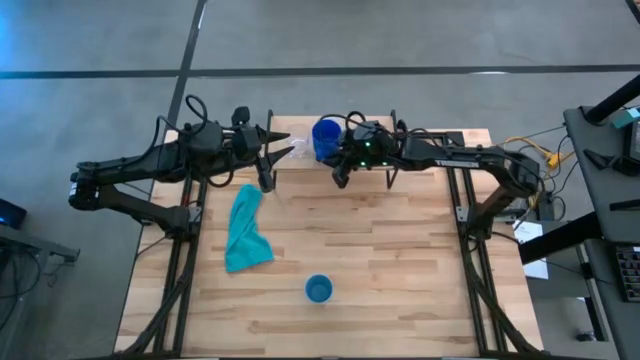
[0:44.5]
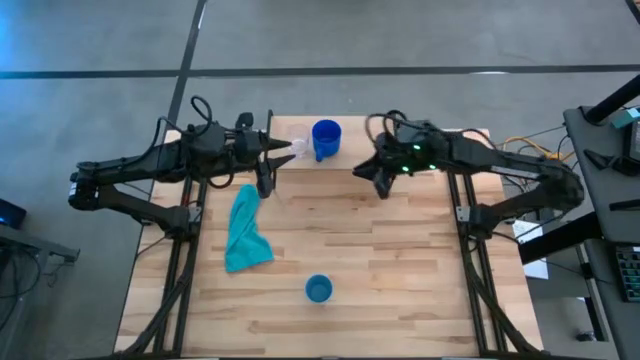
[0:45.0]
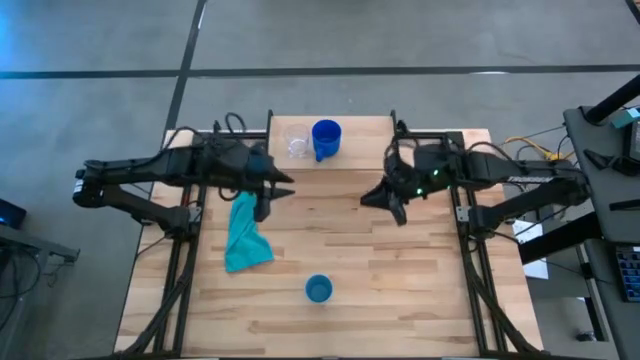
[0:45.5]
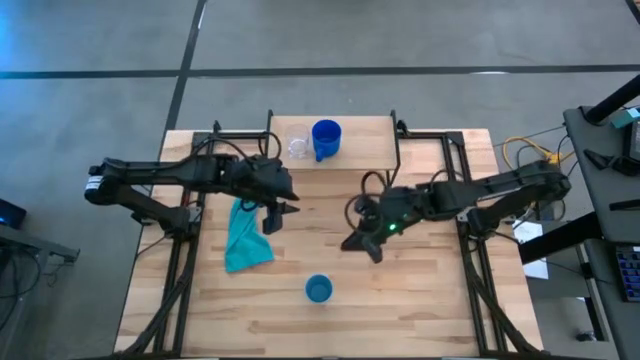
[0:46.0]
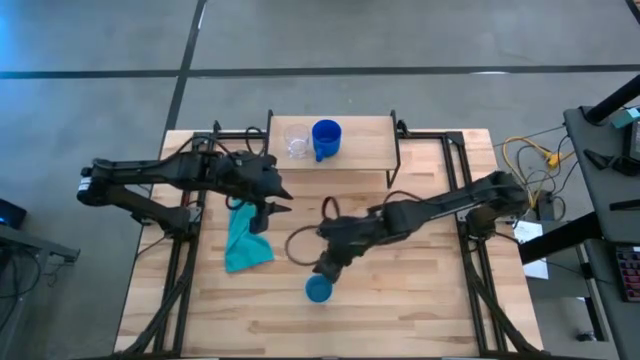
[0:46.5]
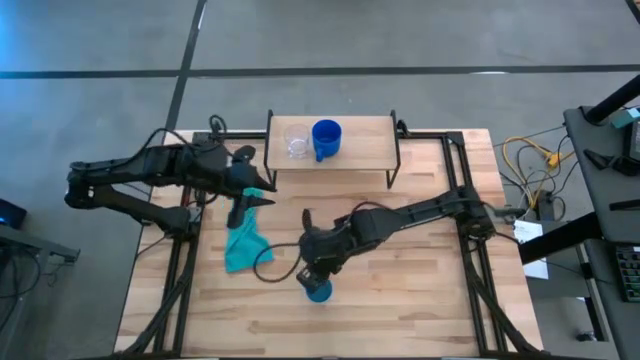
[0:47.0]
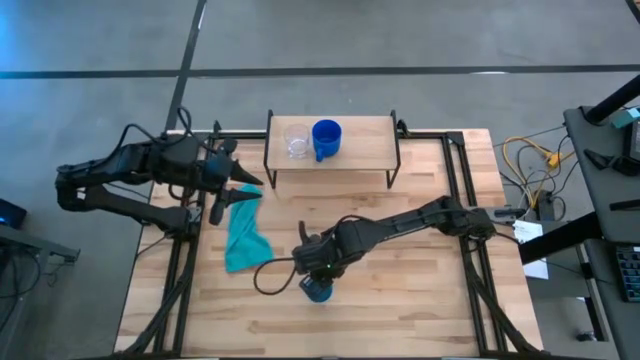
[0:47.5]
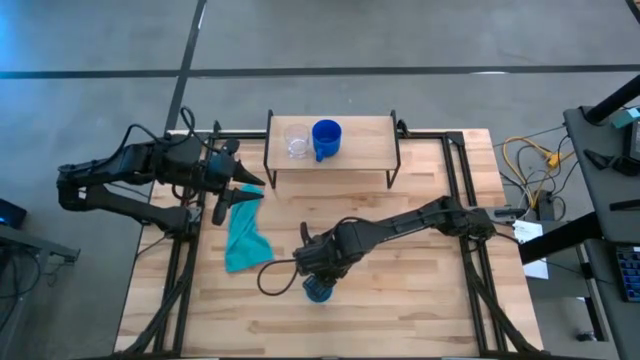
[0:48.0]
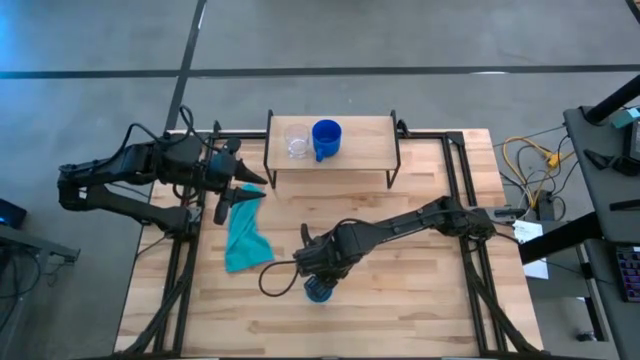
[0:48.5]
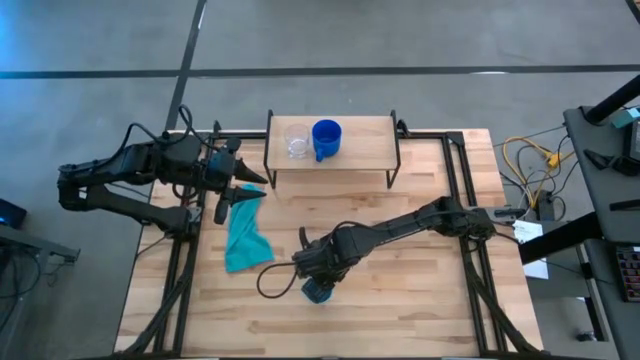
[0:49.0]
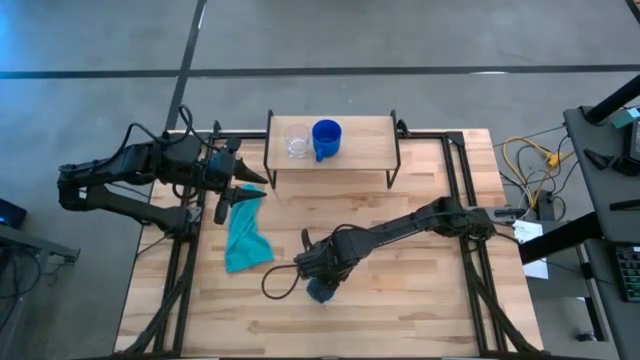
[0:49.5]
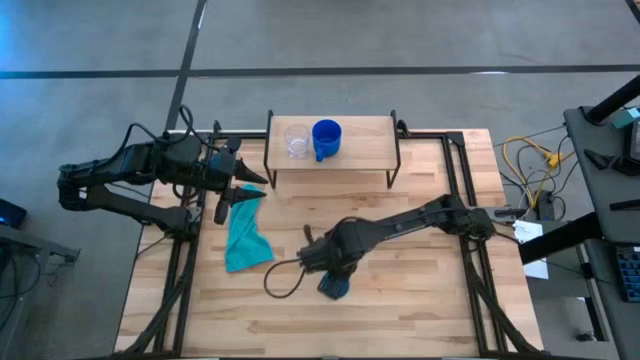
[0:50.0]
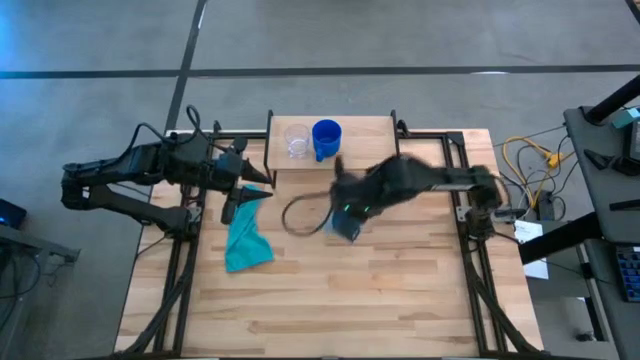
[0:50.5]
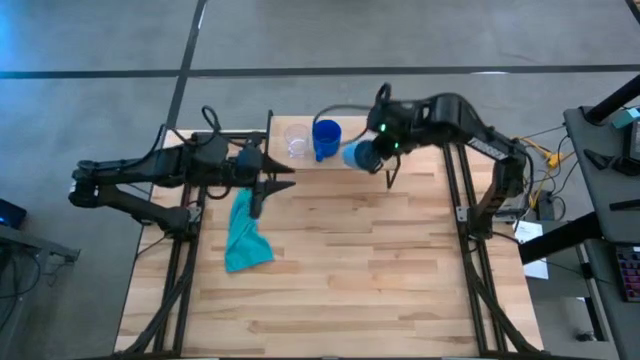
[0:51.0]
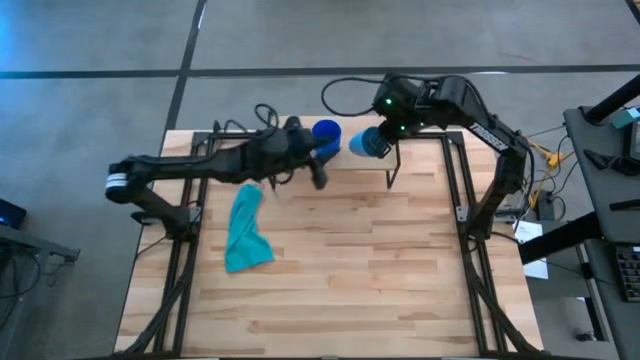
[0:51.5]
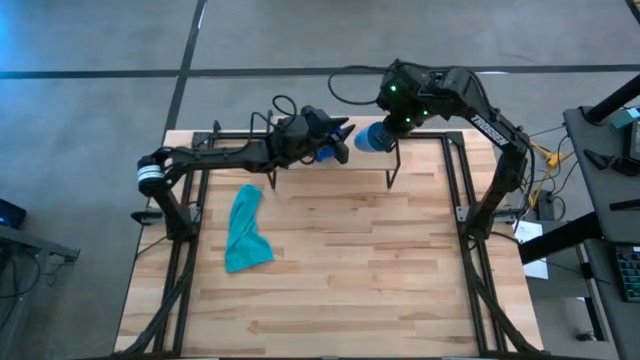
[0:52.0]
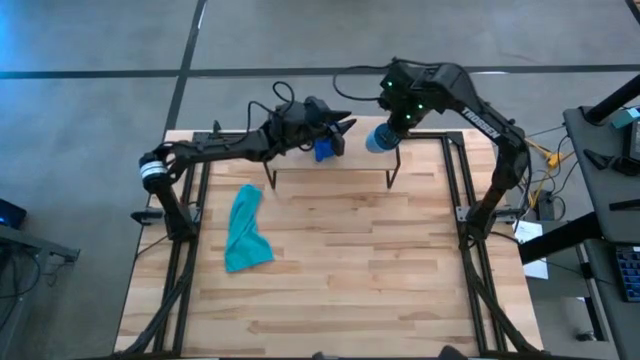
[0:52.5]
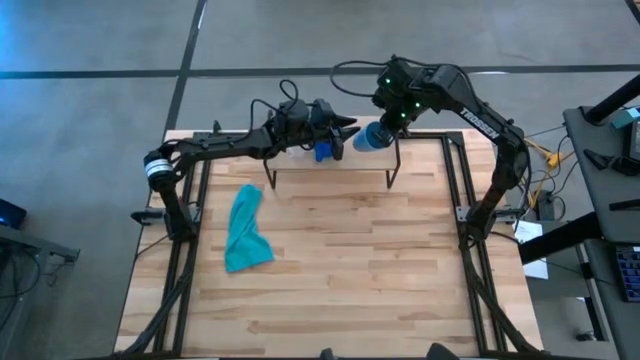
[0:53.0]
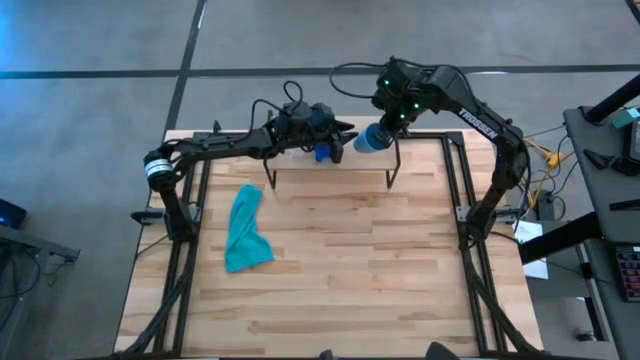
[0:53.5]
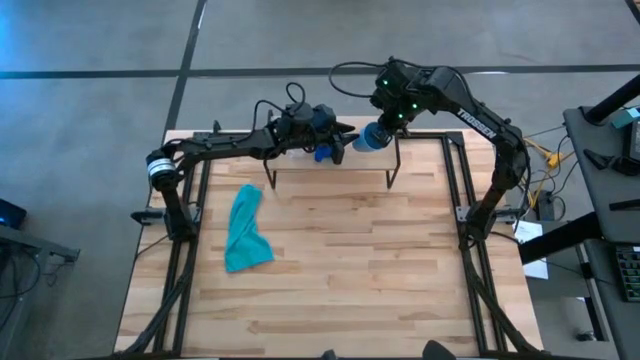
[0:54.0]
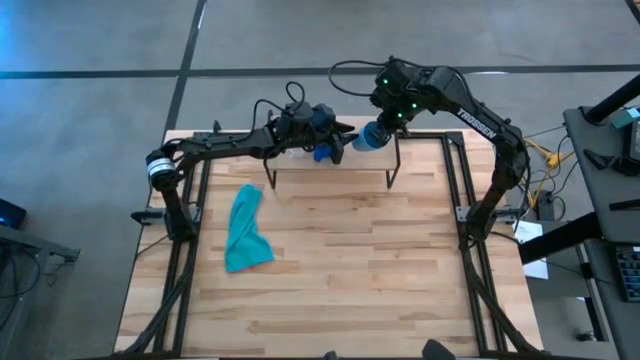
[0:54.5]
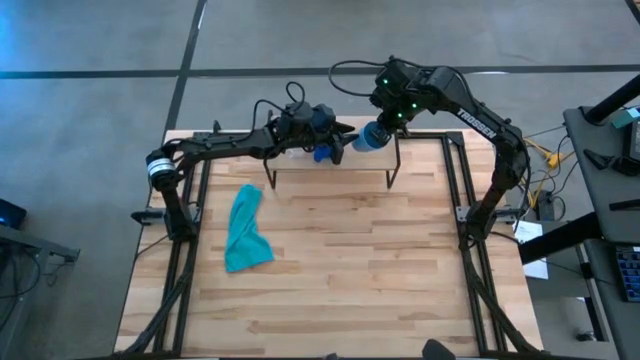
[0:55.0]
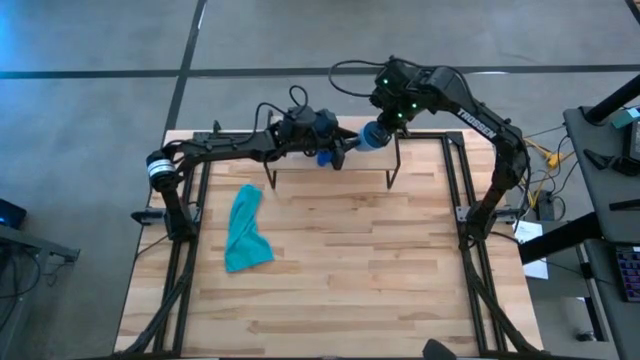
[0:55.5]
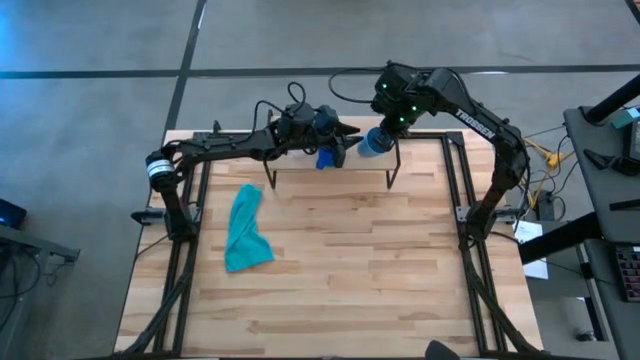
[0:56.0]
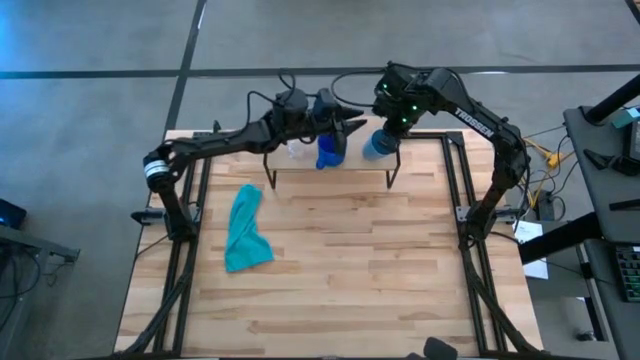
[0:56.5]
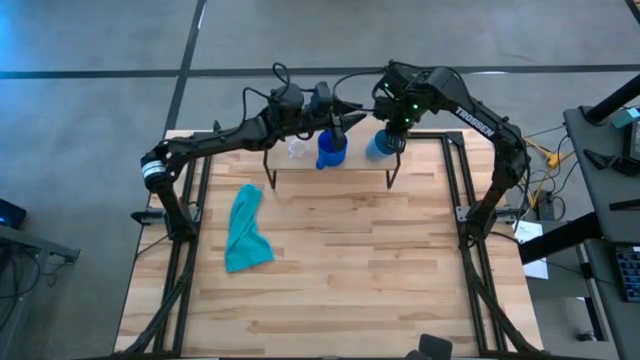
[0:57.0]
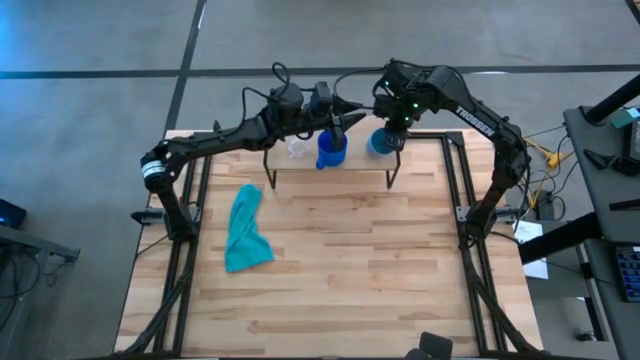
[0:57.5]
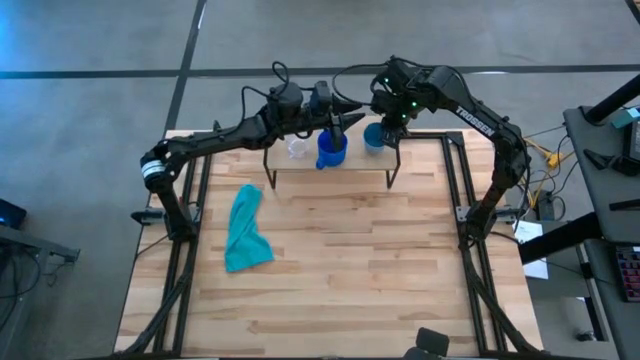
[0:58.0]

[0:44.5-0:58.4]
Task: Stack small to large cups/mugs on shelf
Put the light blue cup on the shelf

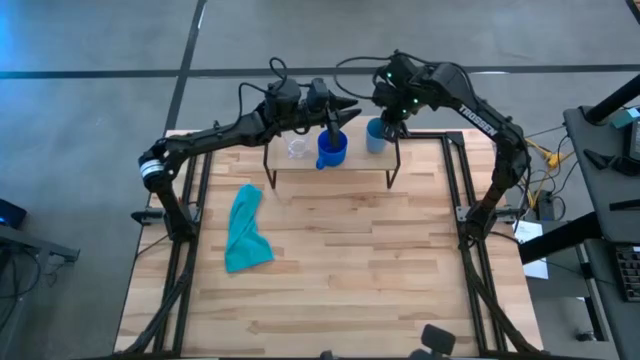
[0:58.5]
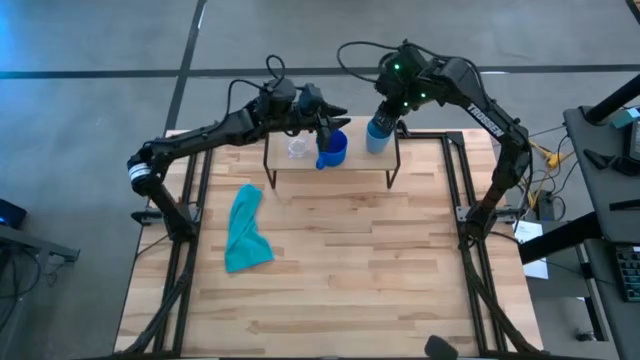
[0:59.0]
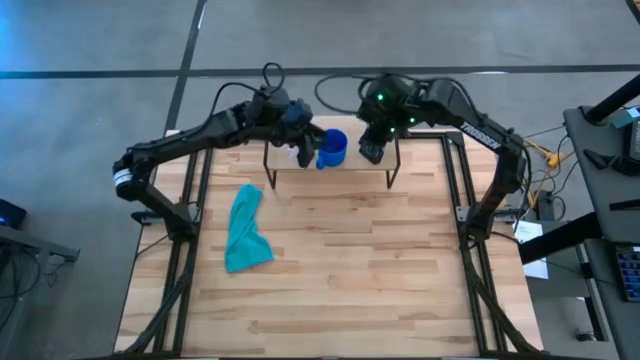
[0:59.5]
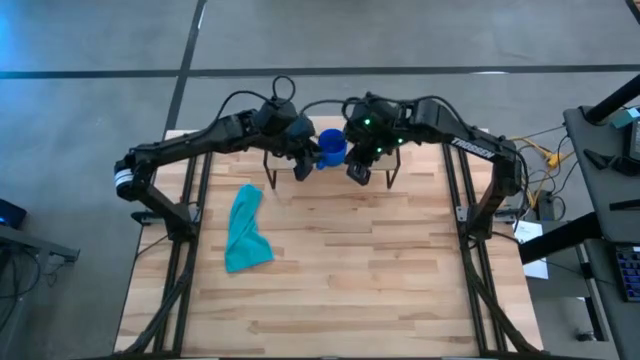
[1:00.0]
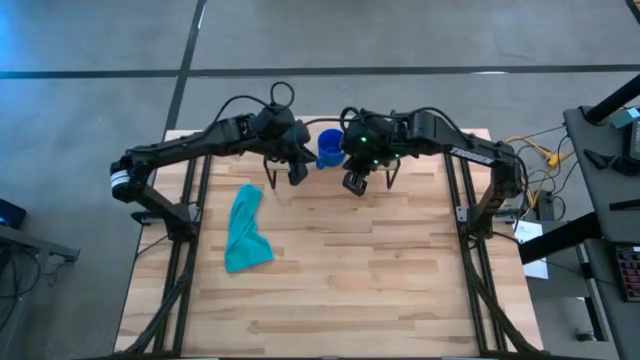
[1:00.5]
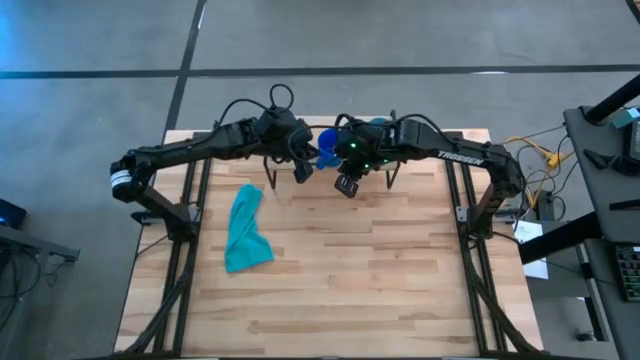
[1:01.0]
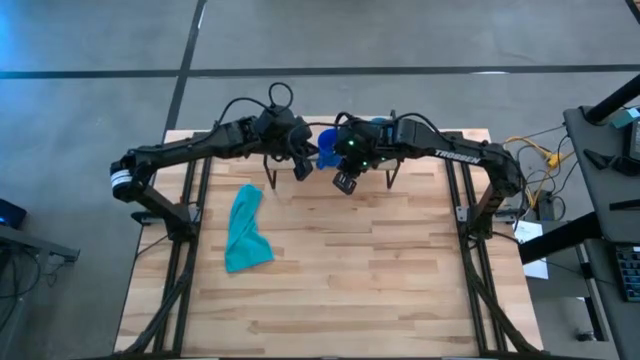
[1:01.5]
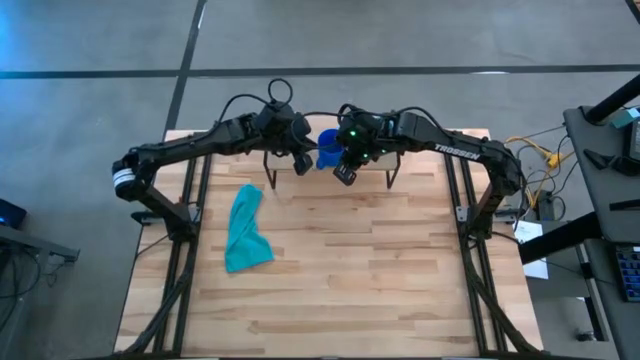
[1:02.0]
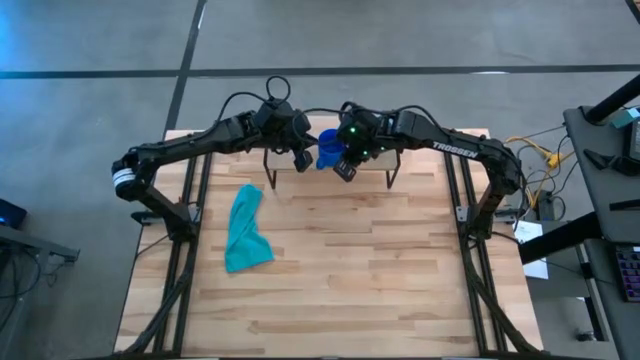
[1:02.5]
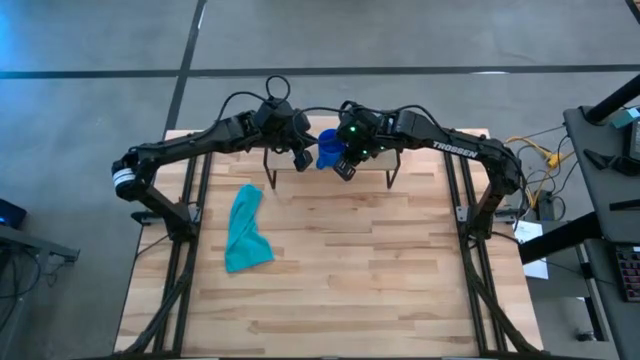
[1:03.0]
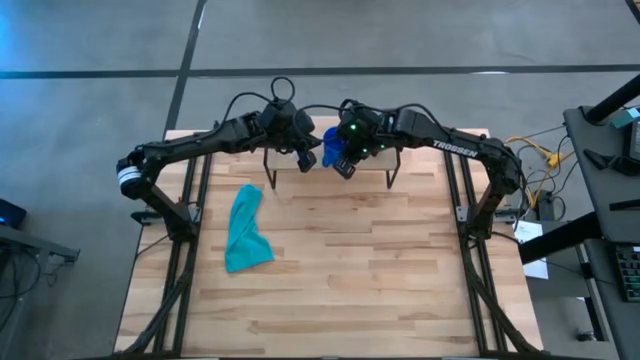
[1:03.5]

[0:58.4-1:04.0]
Adjust the blue mug

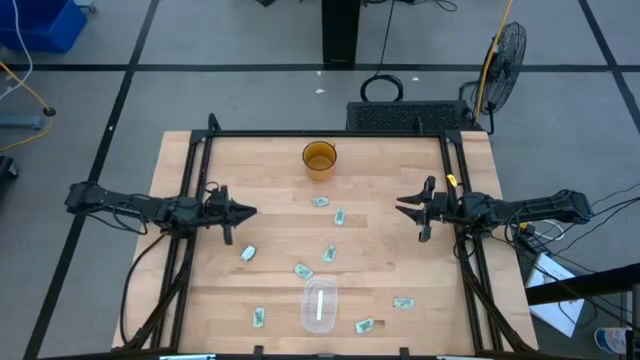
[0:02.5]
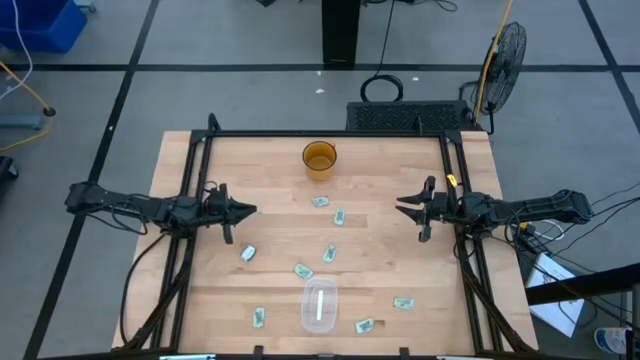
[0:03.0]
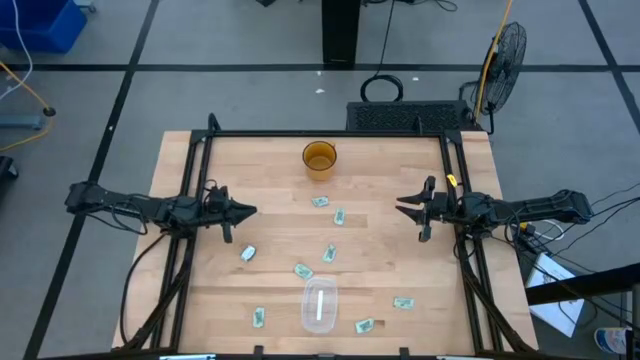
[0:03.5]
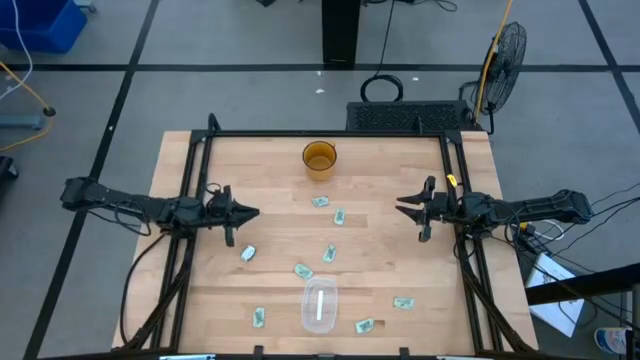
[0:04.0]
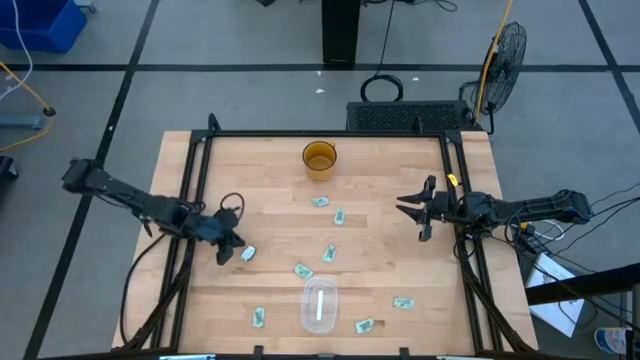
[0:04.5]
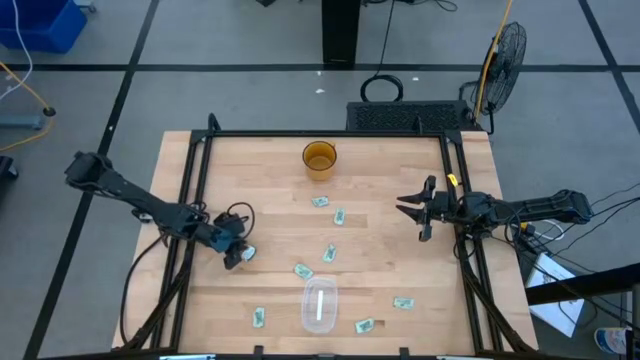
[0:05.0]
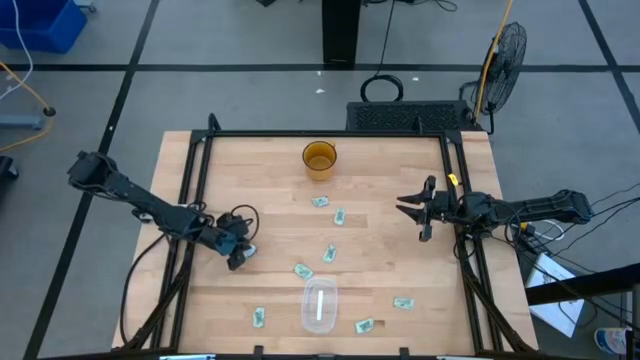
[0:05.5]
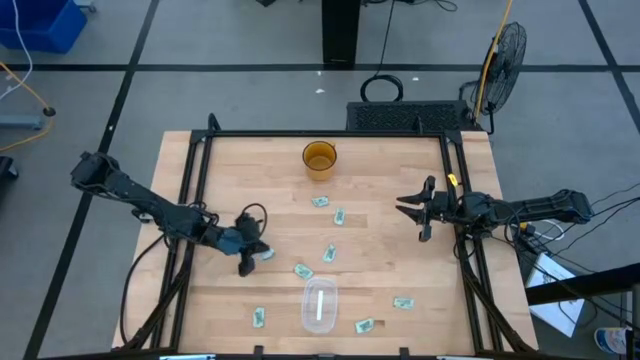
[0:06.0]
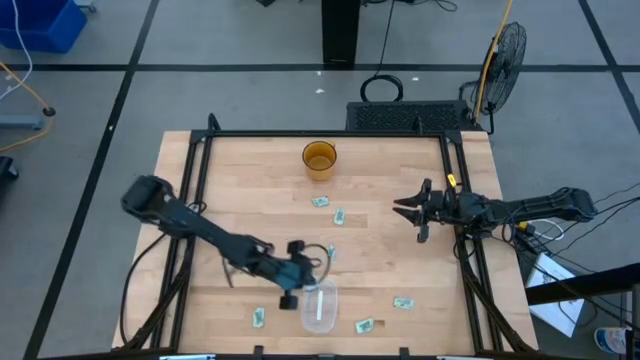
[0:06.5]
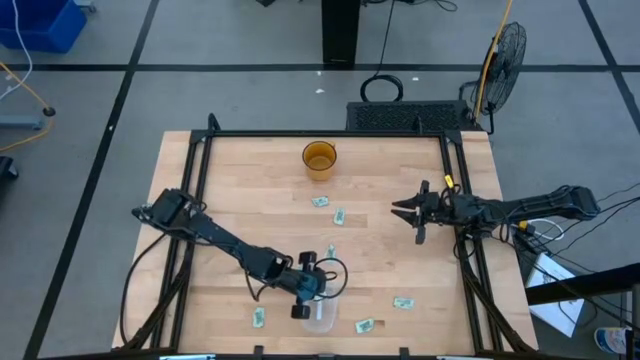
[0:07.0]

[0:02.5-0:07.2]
Task: Pick and place Stevia / Truvia into bins
Put the dark green truvia packet into the transparent container
